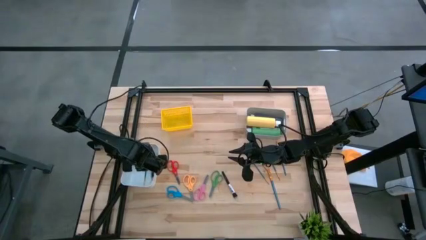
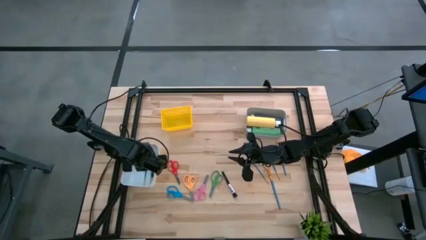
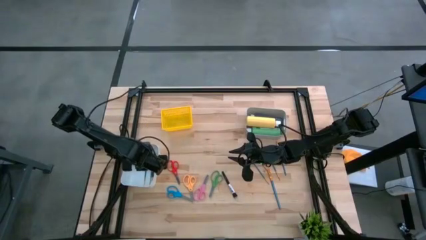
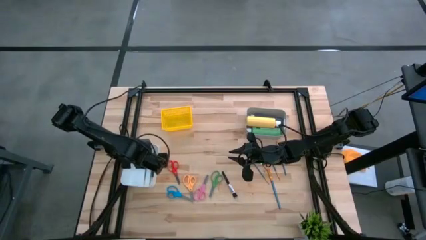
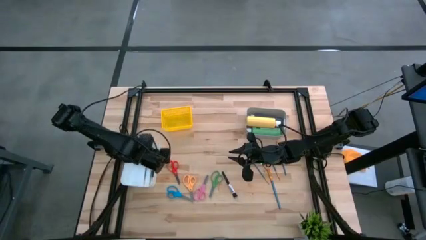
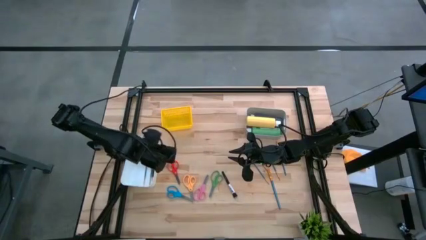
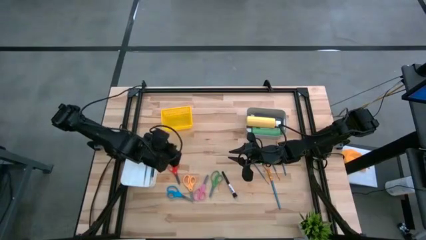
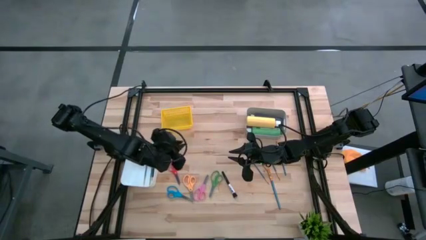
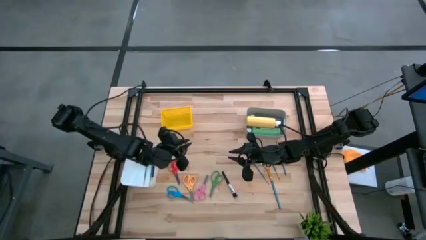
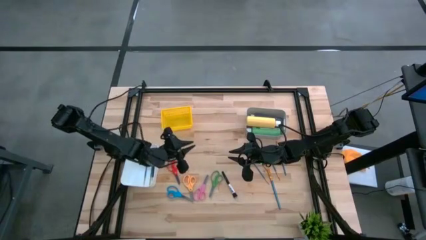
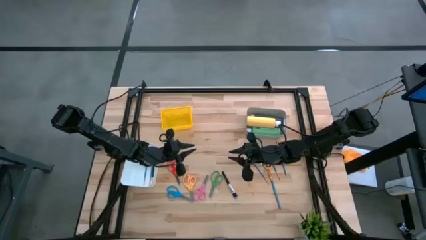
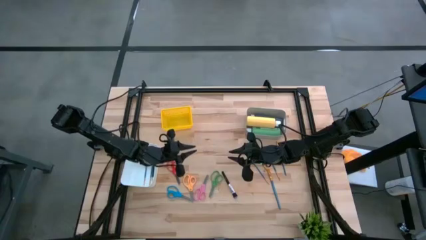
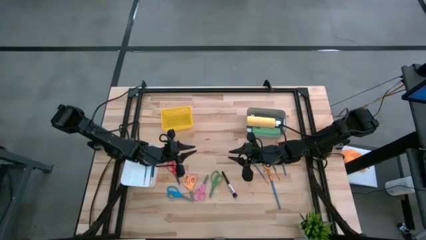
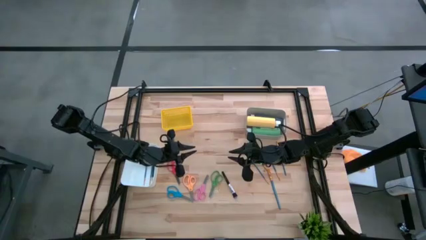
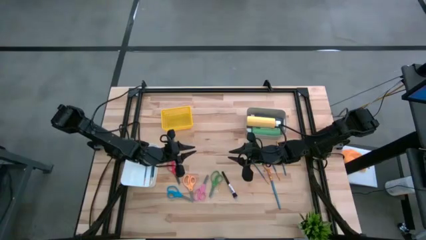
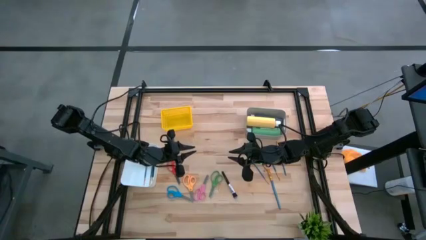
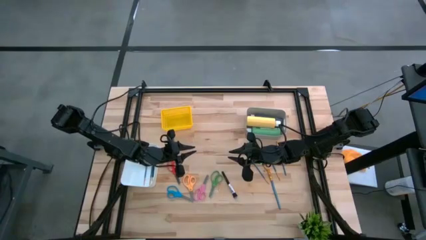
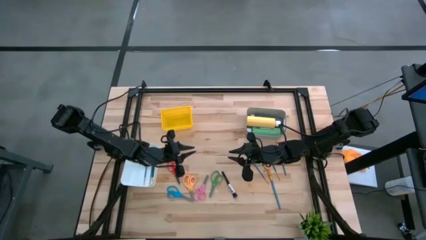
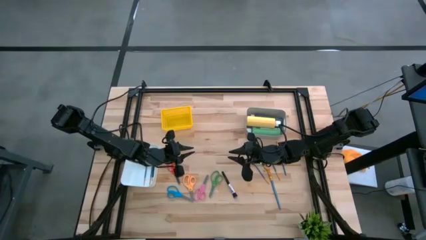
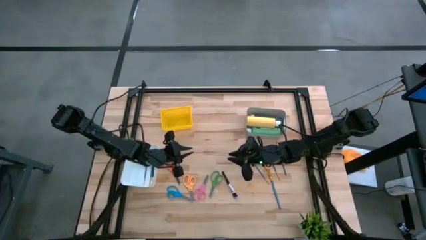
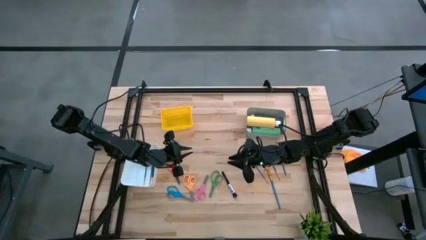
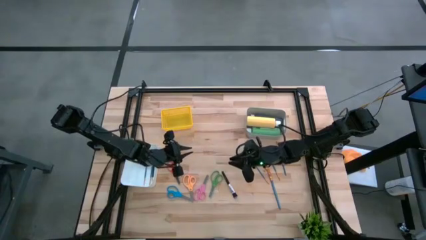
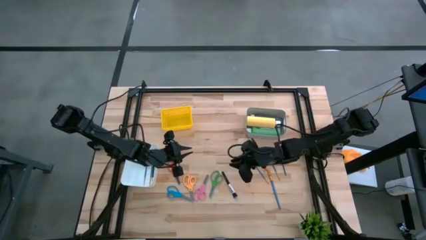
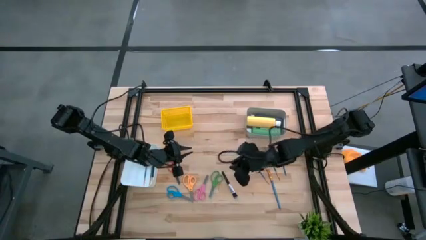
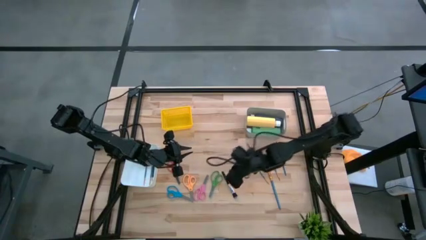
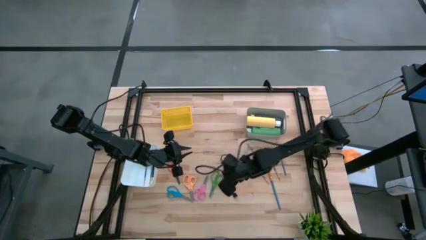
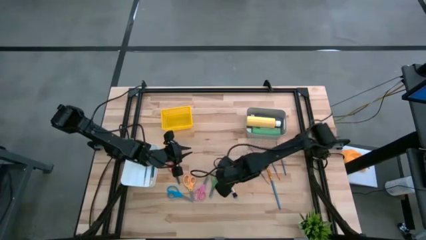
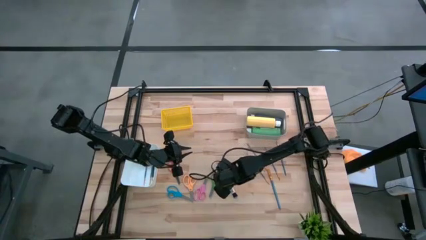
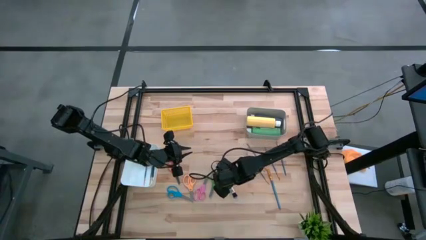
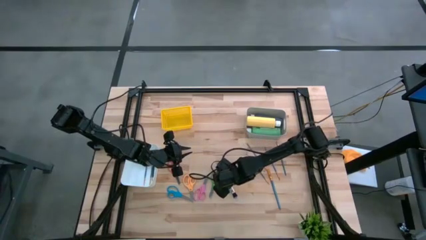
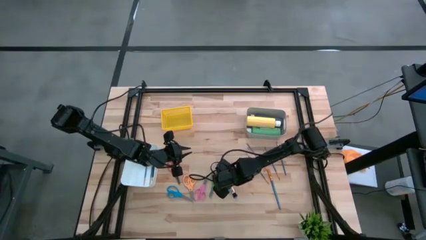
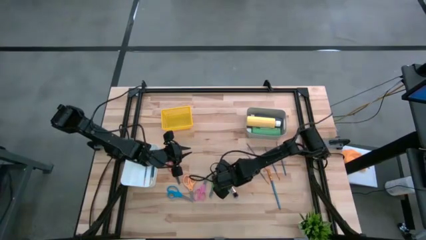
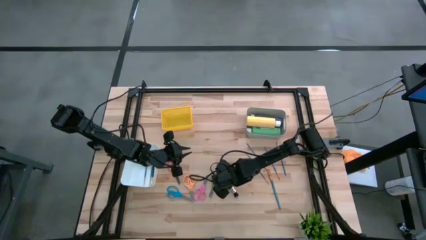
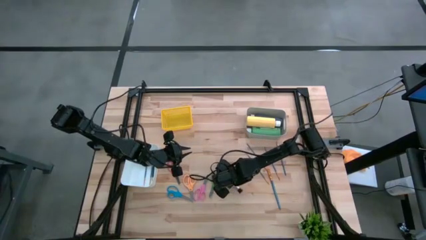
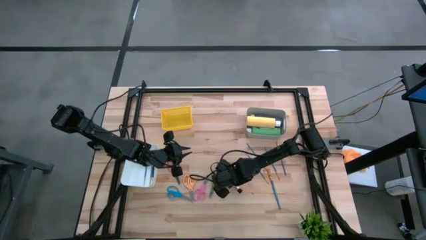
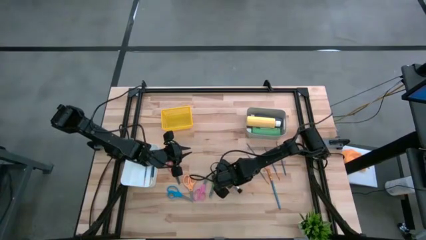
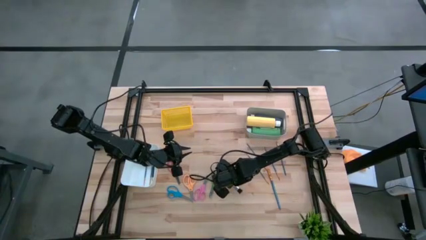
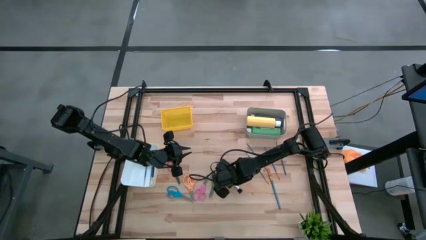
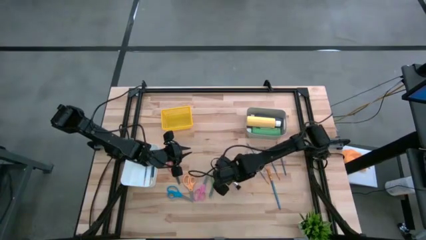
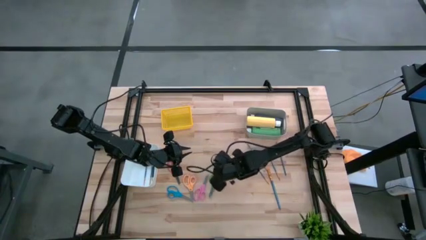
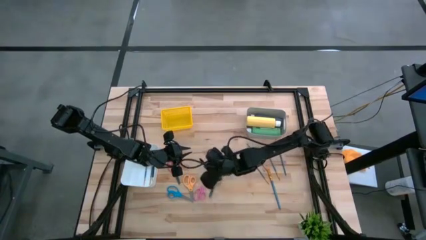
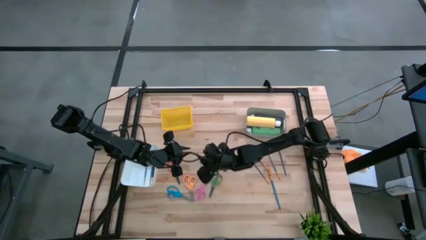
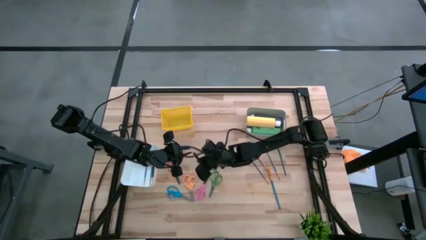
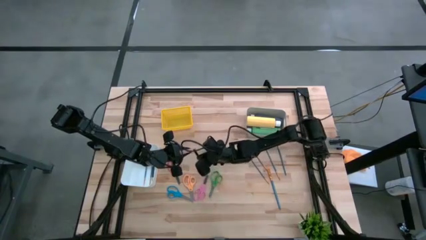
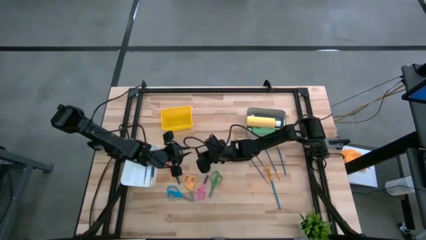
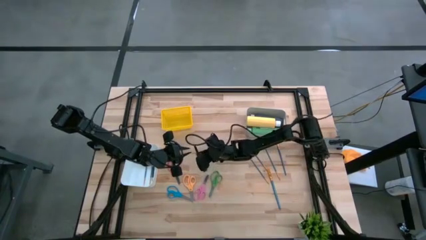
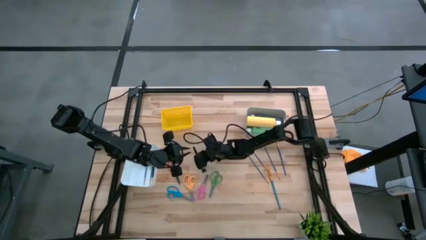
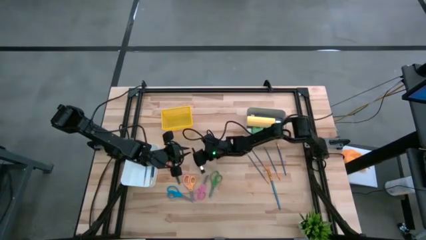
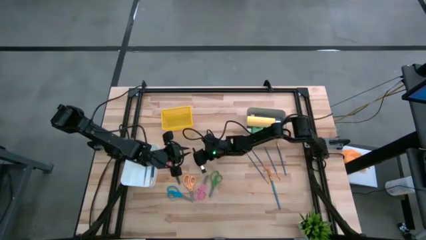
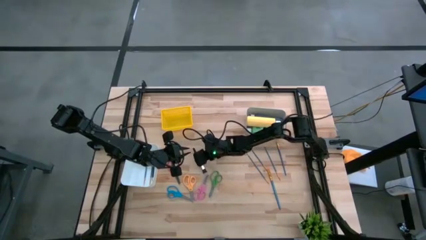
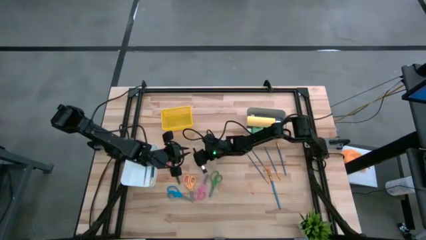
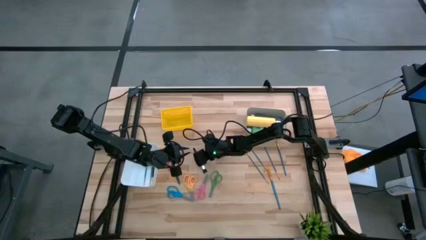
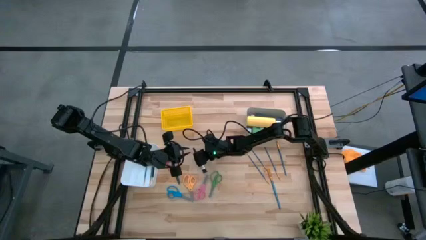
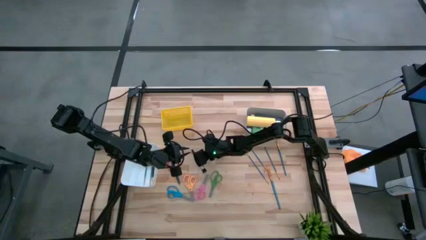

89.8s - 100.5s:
Task: Pick & Place Paint Supplies
Put the black foundation brush into the white bin
